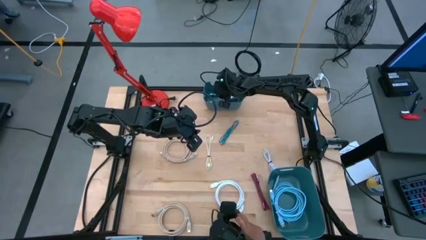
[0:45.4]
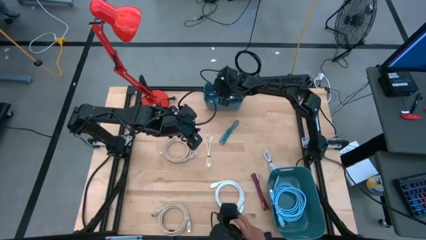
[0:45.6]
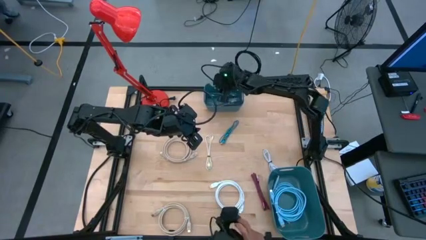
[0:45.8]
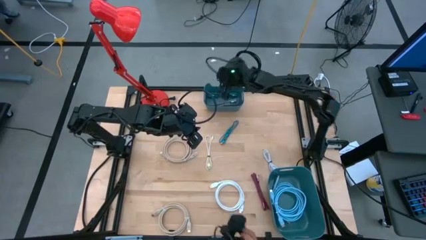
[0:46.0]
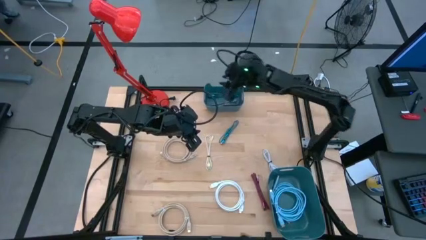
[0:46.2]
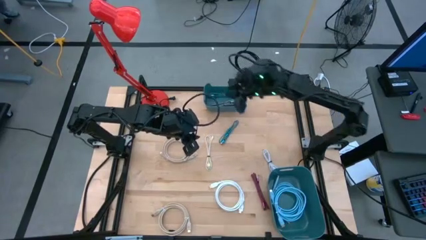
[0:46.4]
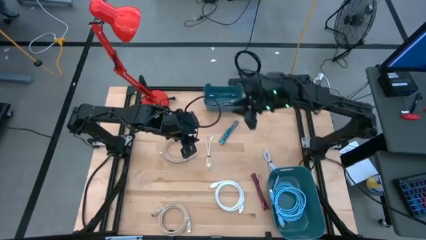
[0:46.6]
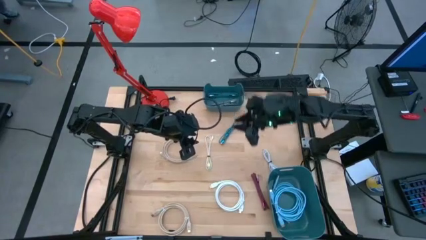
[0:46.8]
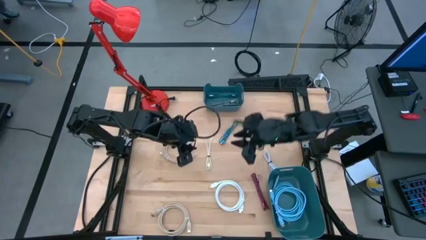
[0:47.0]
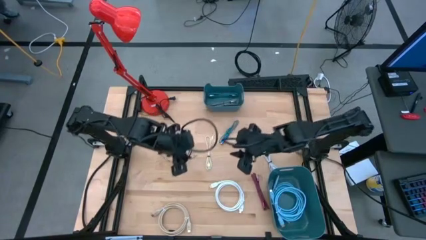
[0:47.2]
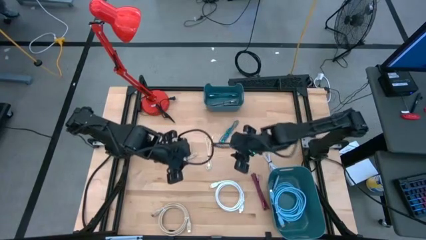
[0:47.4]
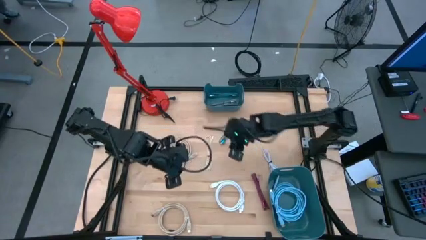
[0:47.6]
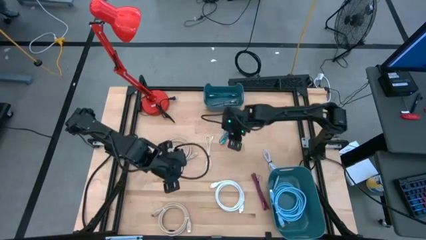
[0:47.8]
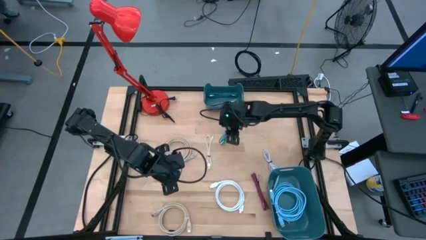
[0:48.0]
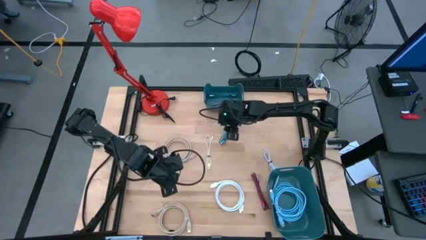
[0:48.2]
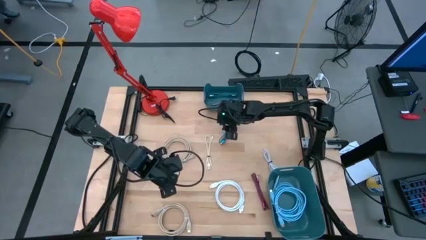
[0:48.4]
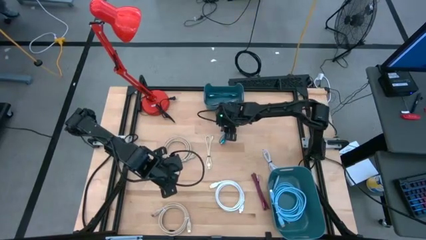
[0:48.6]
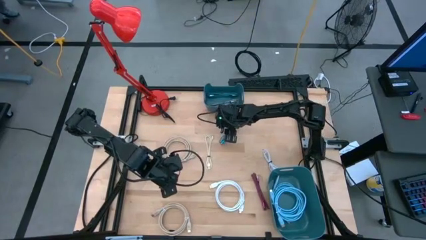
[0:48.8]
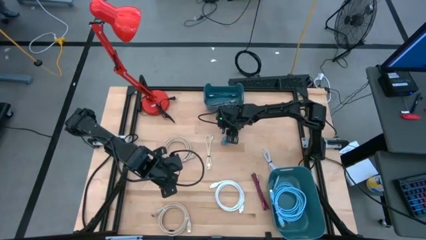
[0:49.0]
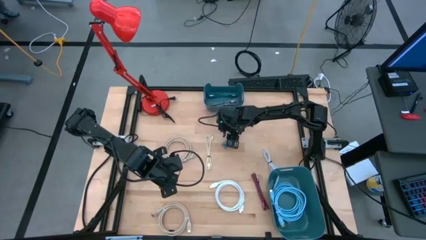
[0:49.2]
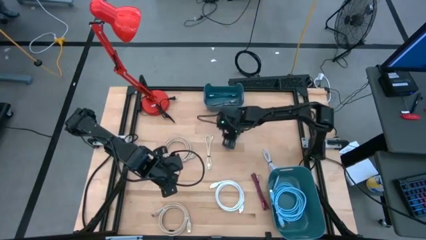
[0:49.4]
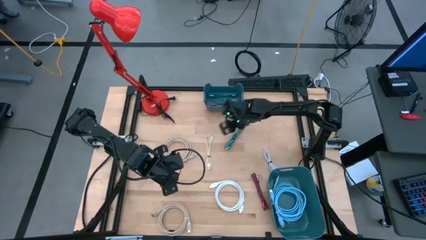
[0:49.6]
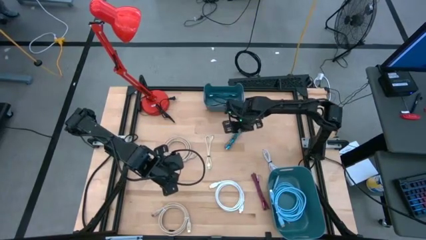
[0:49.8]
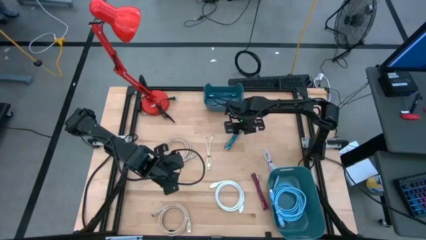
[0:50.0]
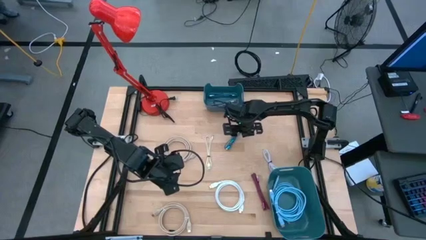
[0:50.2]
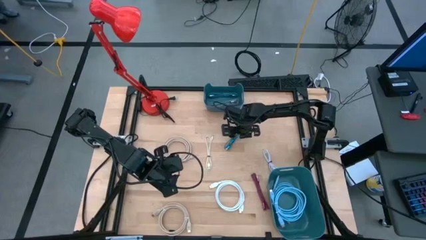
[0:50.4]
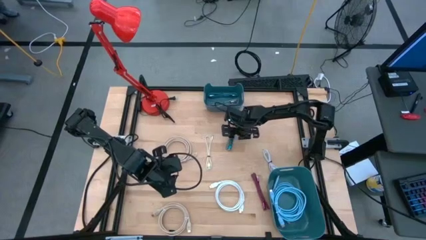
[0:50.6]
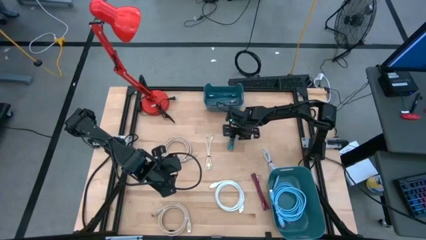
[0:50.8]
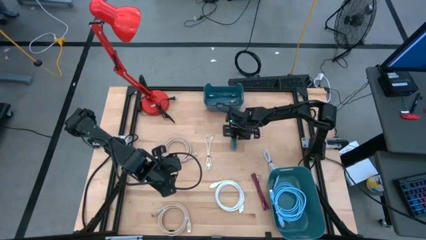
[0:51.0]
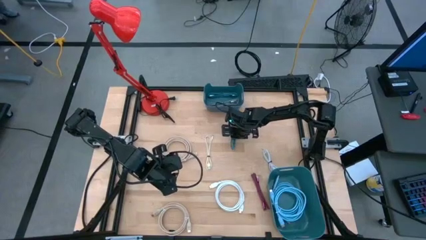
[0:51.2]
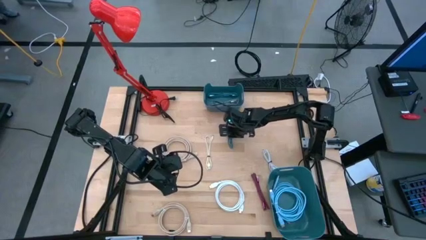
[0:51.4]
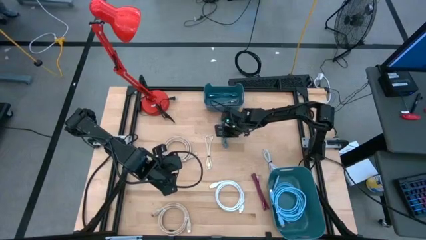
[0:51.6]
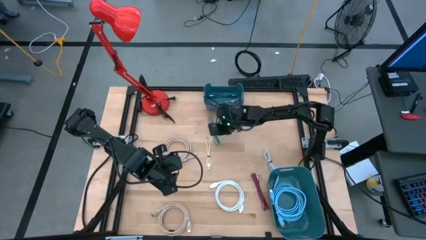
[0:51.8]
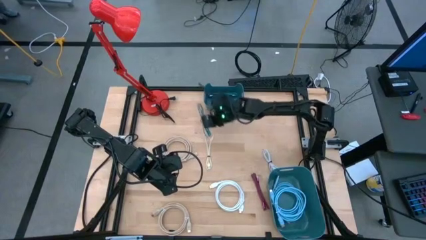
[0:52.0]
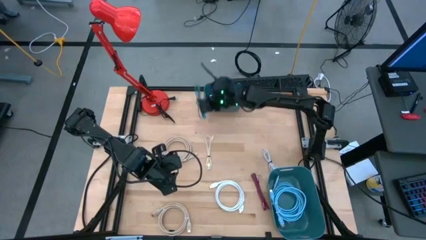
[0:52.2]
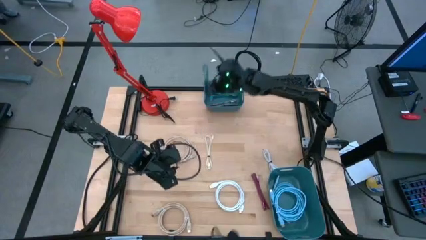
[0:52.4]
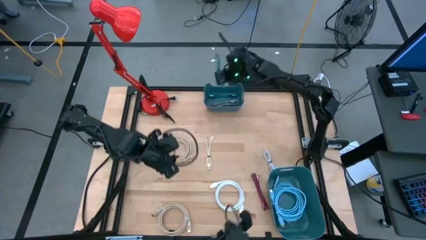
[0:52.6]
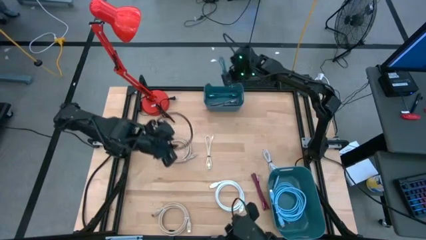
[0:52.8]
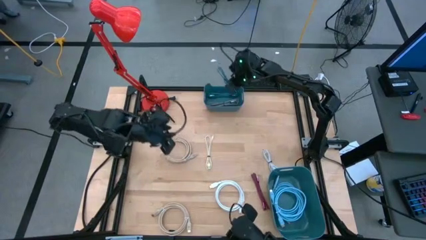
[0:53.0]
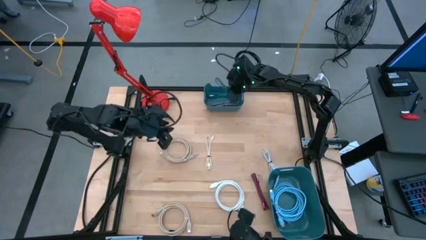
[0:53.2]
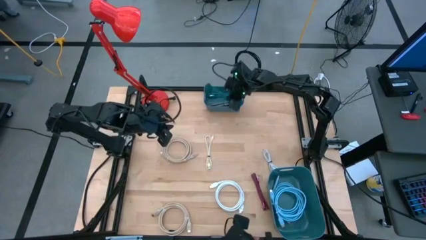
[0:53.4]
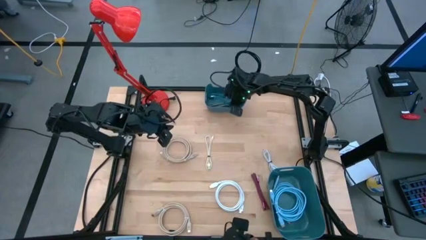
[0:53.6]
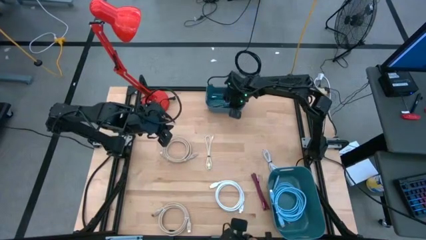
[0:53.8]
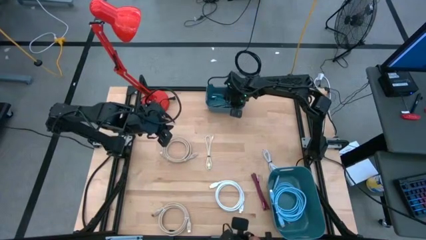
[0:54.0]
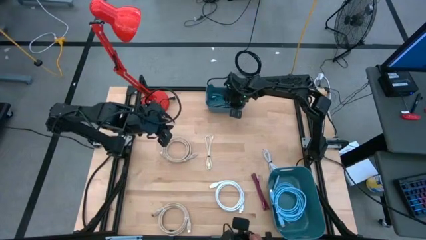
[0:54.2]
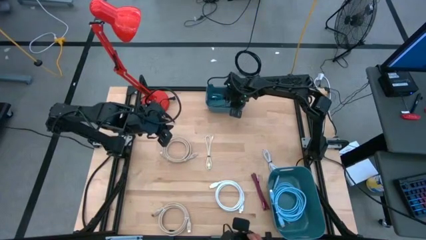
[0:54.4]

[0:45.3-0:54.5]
Task: Pick & Place USB Port
Put the blue and white charger cable into the top blue bin

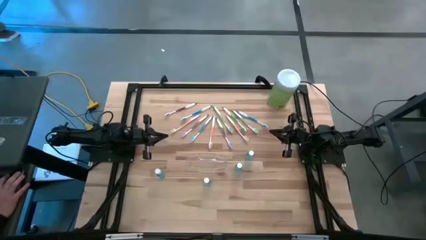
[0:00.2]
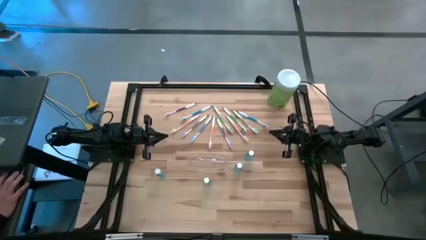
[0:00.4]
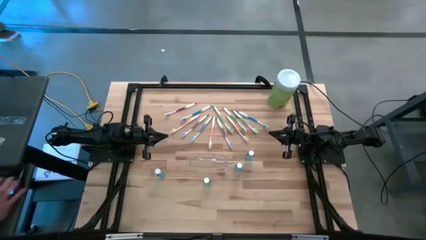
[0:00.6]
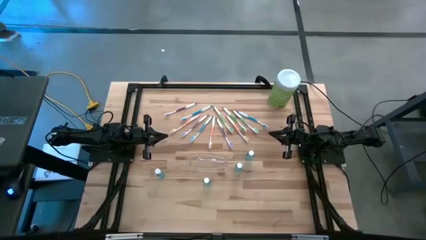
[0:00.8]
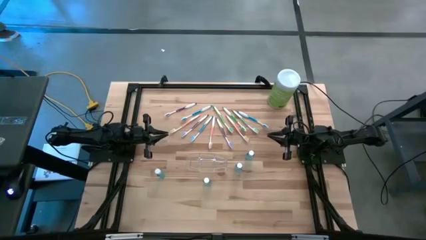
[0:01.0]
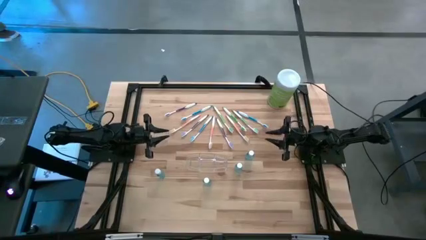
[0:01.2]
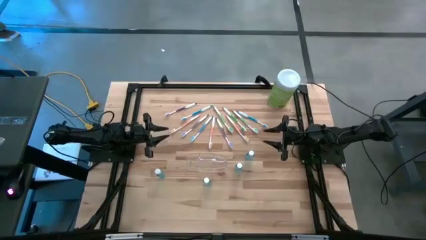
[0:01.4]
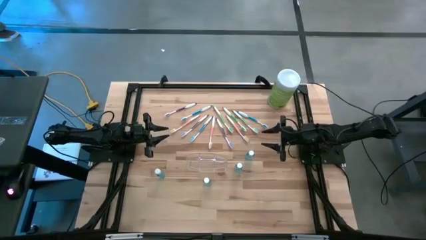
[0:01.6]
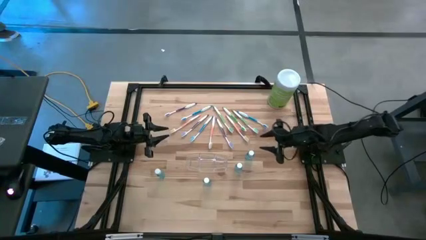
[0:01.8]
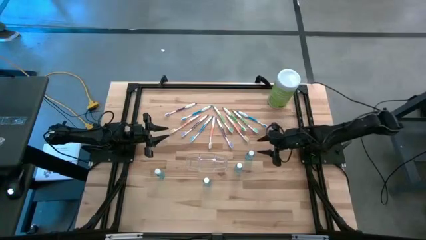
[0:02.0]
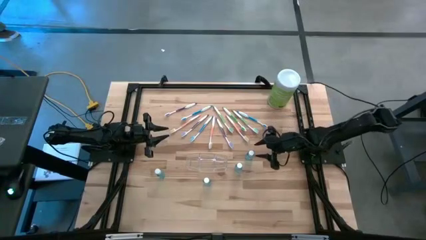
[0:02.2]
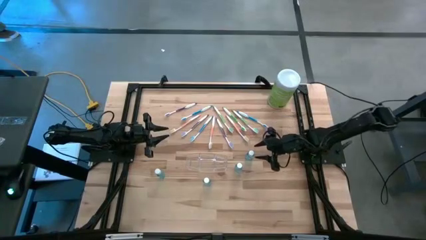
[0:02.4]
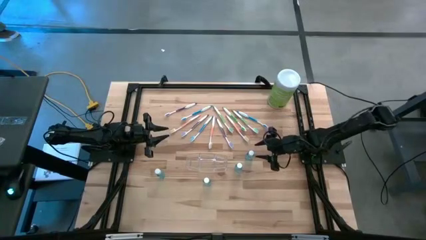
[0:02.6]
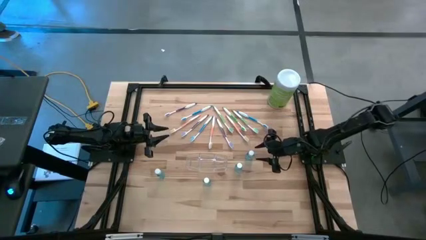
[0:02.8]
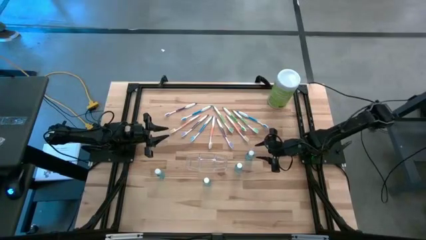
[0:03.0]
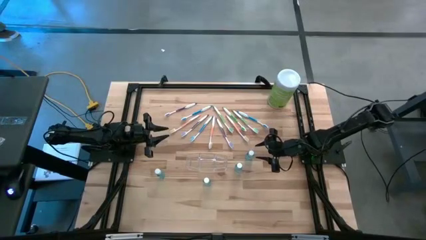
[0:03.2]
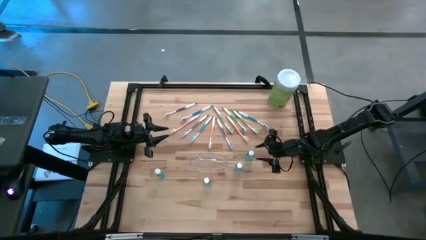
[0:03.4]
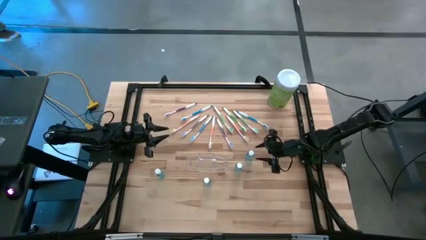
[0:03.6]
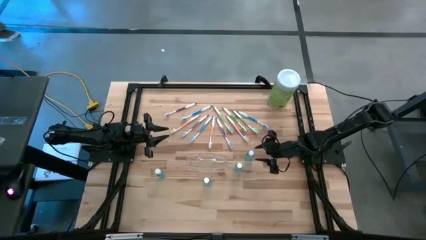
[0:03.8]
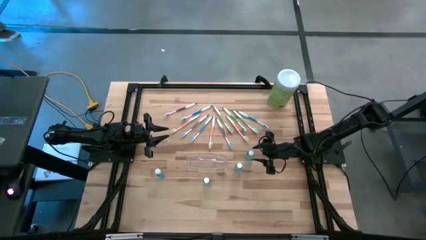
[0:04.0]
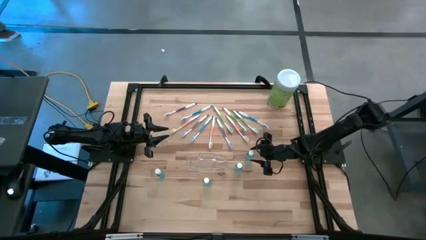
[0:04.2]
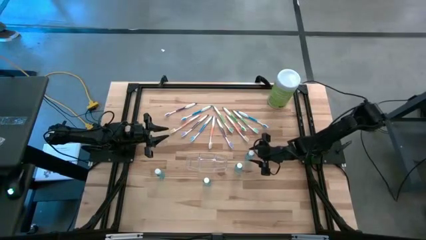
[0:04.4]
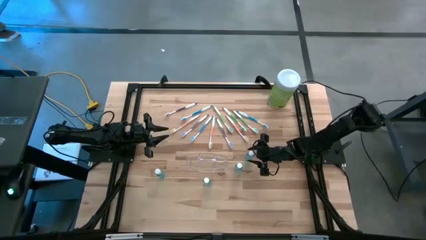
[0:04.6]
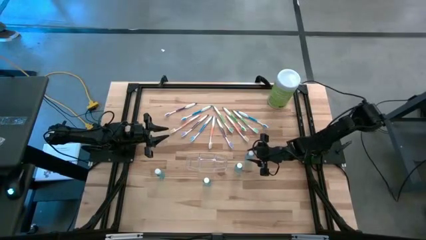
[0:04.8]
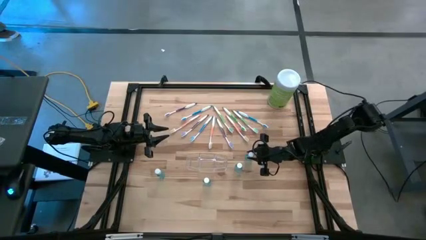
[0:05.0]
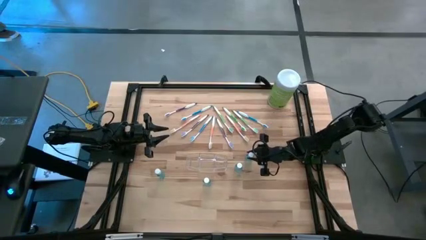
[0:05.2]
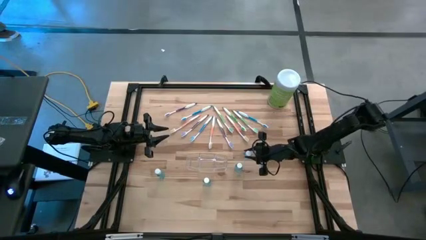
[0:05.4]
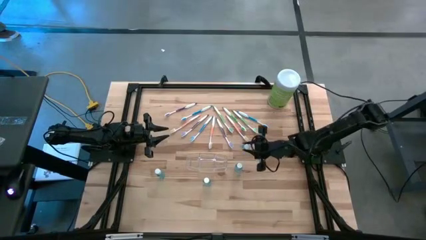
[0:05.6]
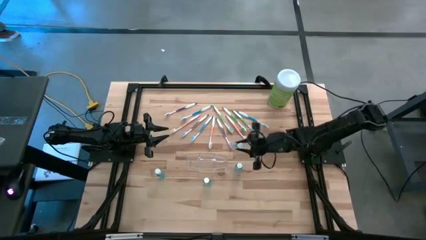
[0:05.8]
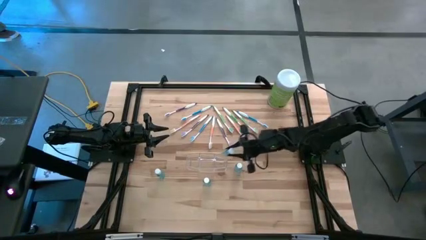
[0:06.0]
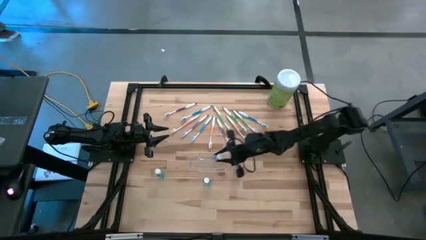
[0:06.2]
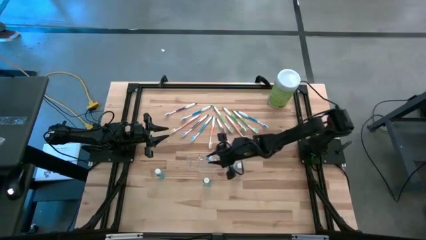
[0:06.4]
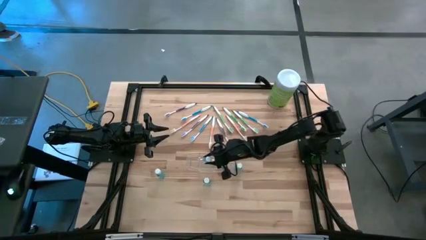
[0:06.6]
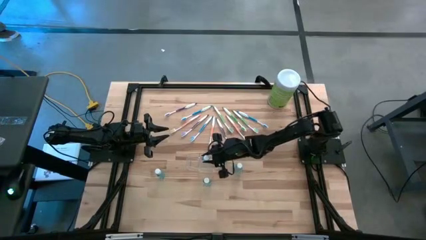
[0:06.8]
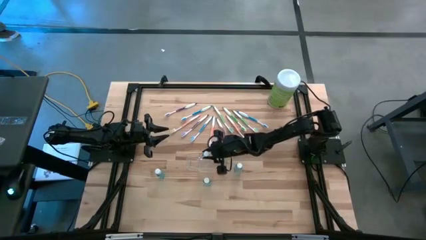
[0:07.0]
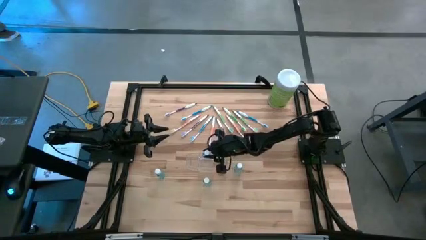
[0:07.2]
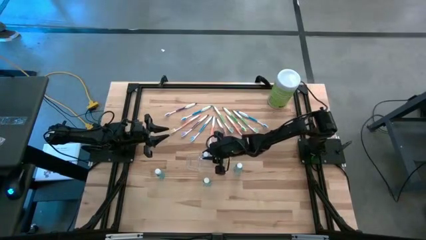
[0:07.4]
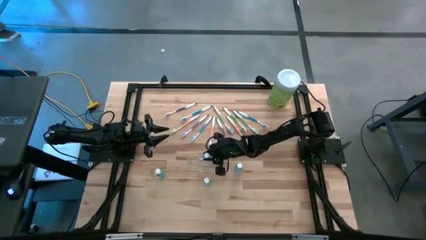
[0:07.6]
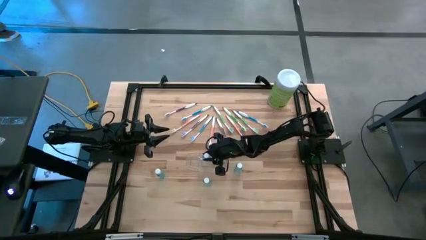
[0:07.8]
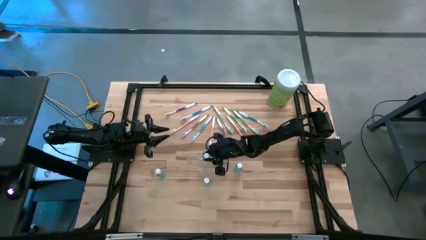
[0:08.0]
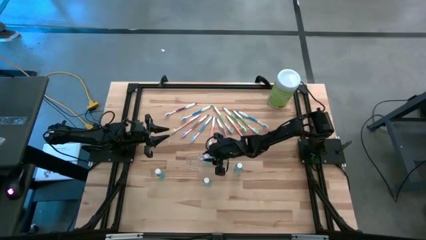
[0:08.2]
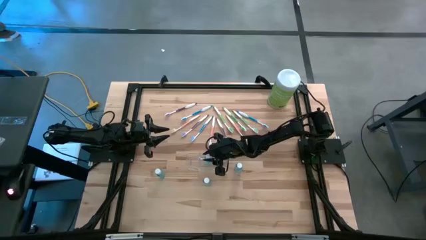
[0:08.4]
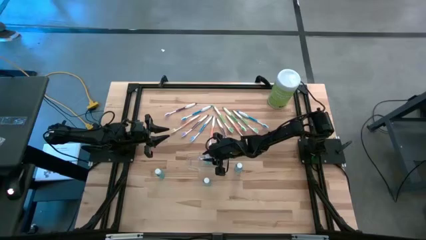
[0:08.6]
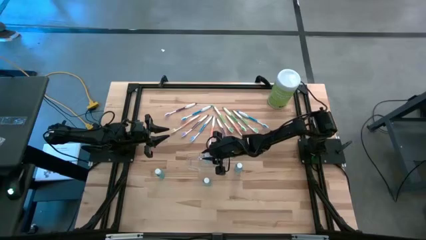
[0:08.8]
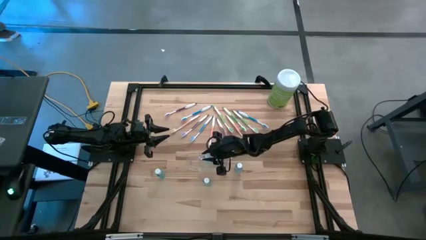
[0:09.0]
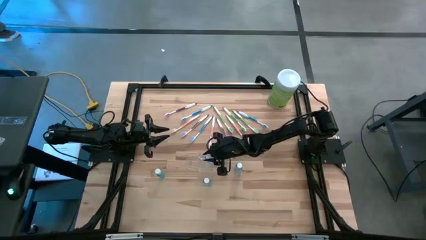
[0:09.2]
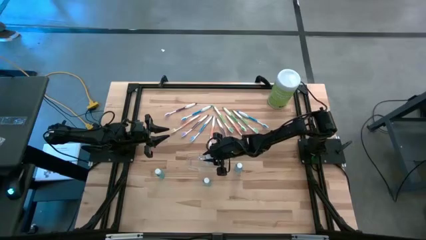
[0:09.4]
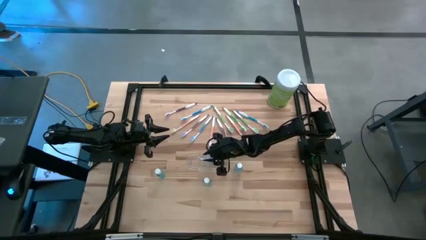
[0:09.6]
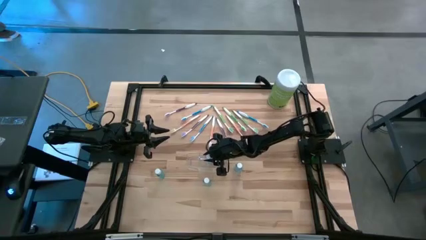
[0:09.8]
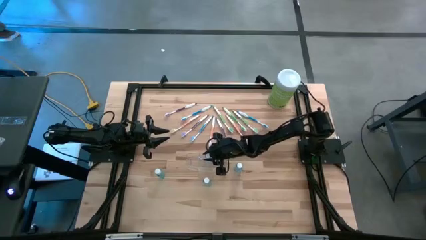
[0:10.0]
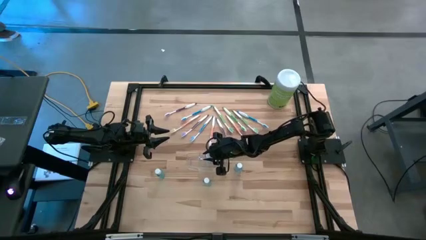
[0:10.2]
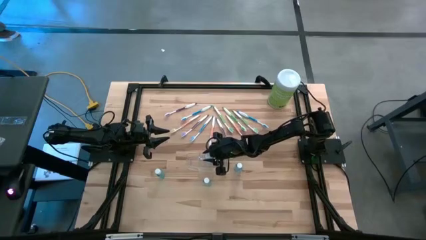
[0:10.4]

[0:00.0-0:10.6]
Task: Pick & Place toothbrushing station
Put the blue mouthwash into the transparent organizer
